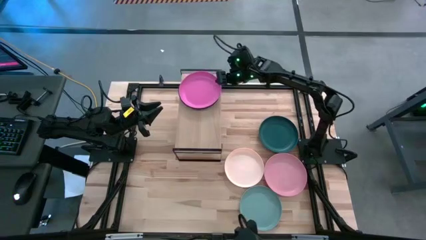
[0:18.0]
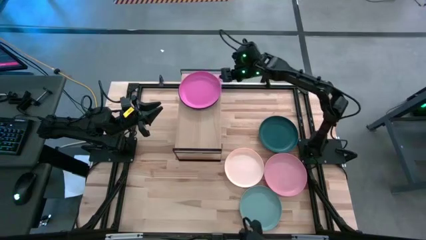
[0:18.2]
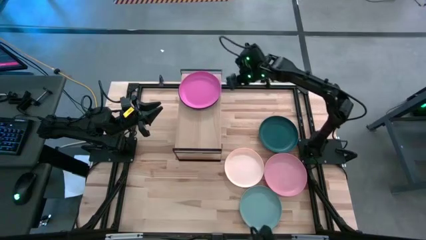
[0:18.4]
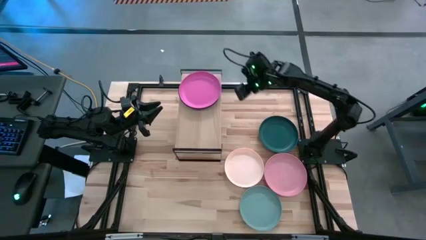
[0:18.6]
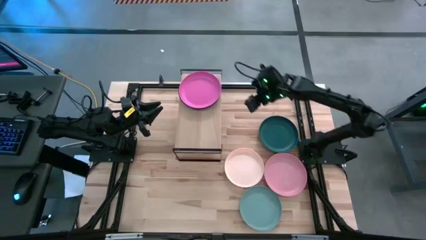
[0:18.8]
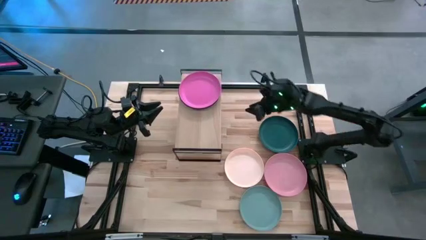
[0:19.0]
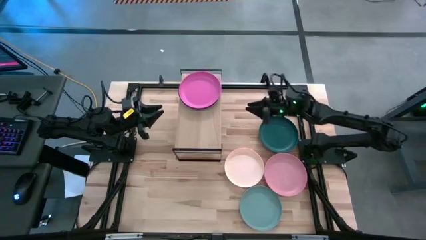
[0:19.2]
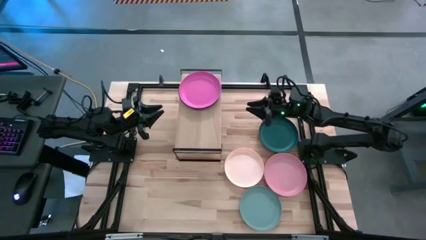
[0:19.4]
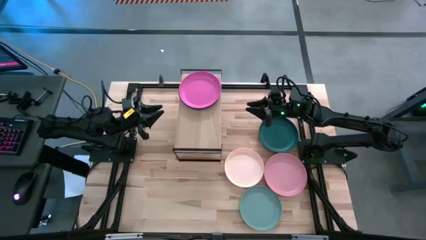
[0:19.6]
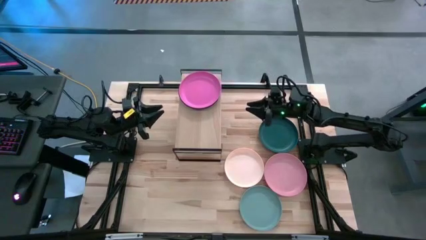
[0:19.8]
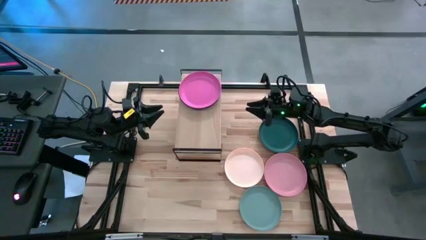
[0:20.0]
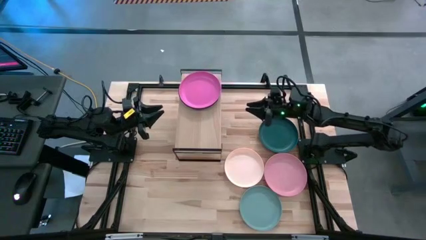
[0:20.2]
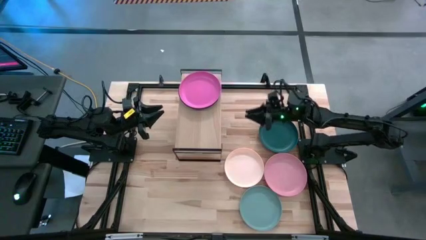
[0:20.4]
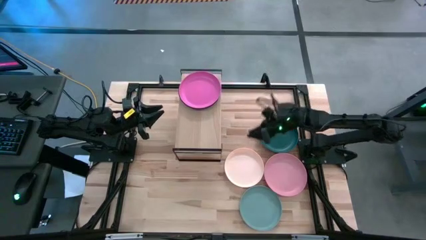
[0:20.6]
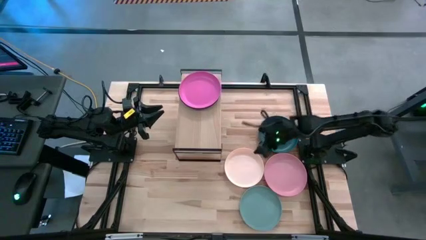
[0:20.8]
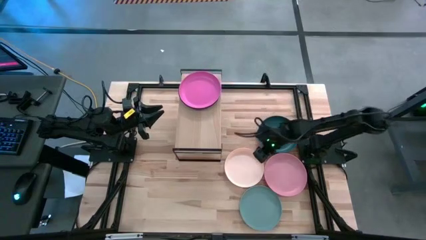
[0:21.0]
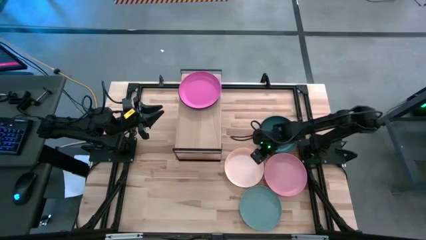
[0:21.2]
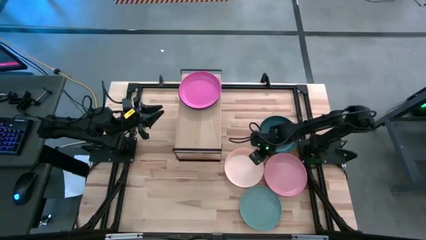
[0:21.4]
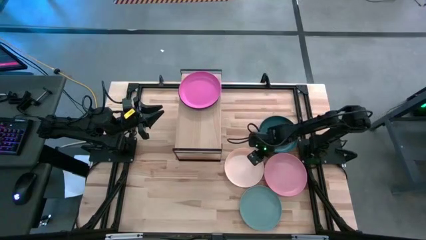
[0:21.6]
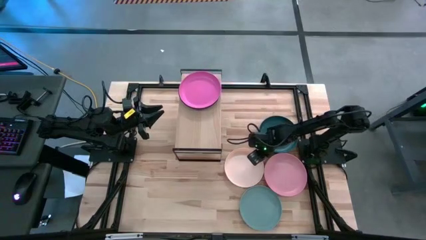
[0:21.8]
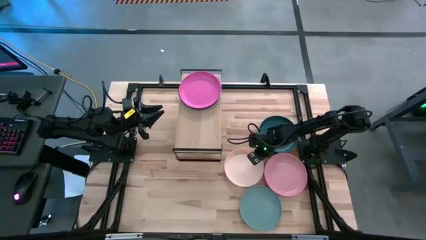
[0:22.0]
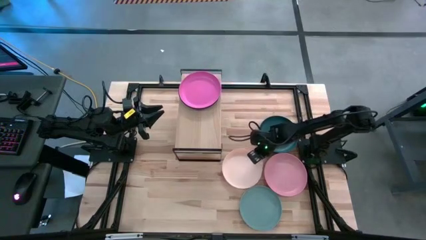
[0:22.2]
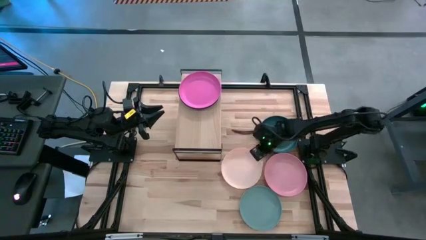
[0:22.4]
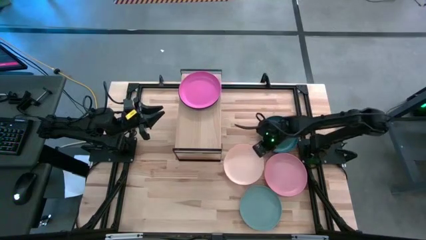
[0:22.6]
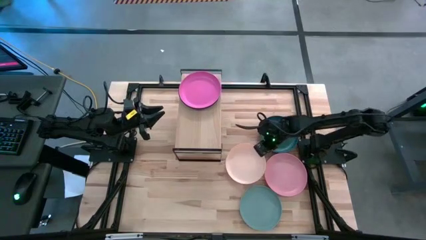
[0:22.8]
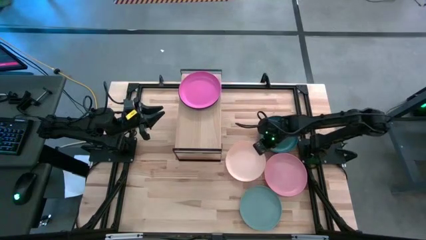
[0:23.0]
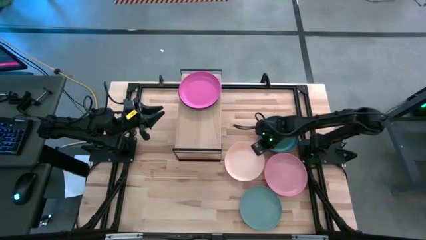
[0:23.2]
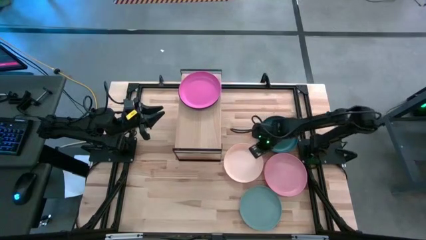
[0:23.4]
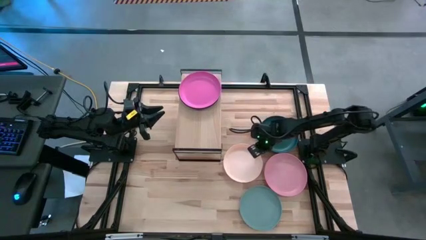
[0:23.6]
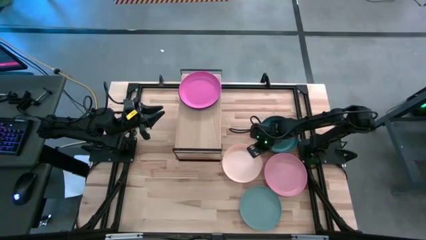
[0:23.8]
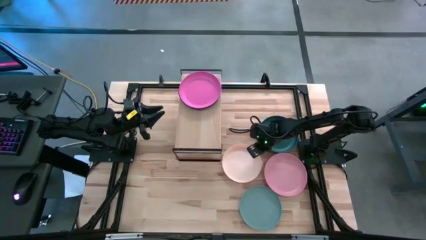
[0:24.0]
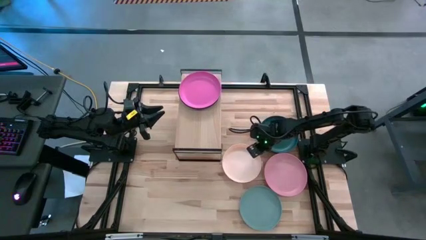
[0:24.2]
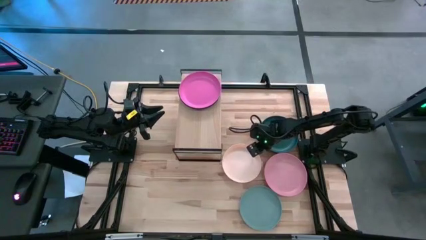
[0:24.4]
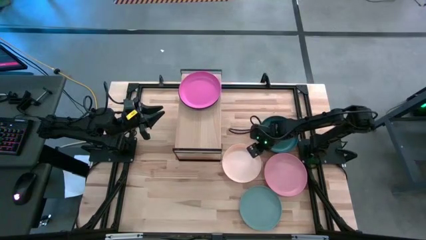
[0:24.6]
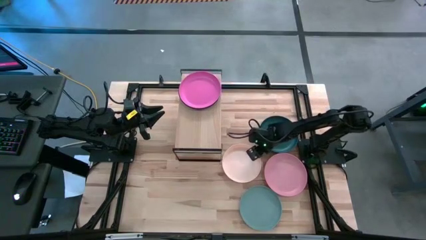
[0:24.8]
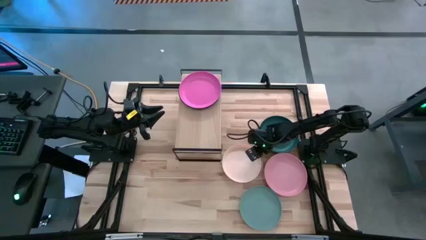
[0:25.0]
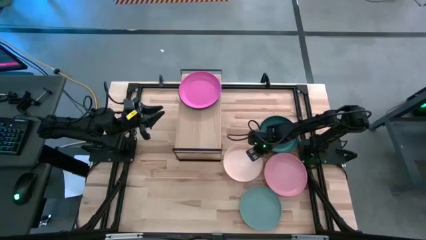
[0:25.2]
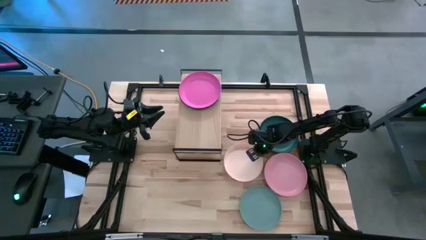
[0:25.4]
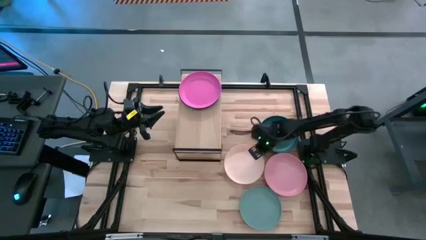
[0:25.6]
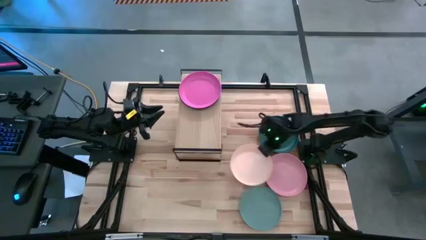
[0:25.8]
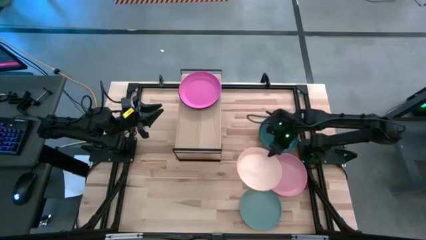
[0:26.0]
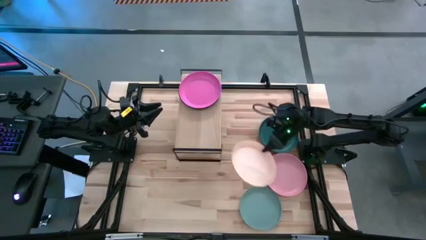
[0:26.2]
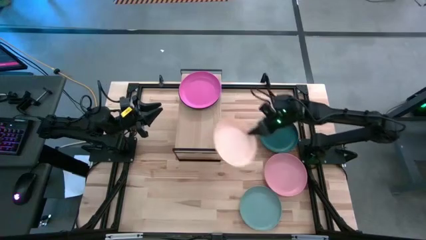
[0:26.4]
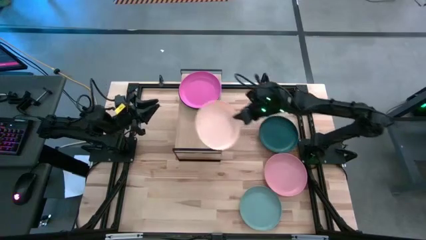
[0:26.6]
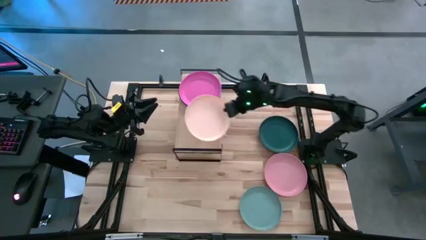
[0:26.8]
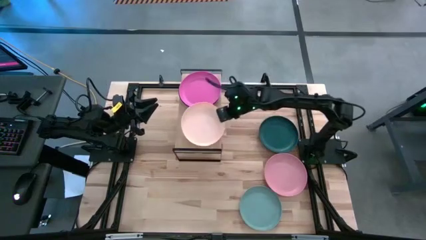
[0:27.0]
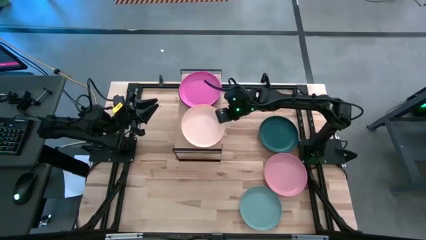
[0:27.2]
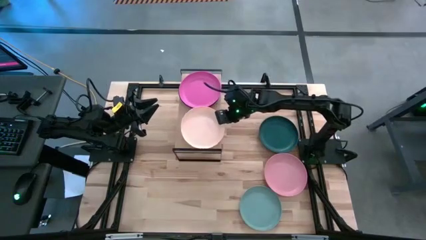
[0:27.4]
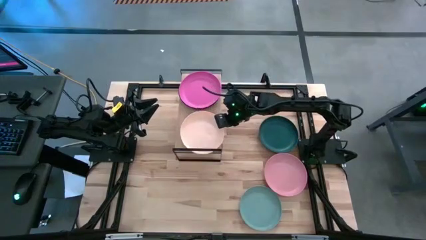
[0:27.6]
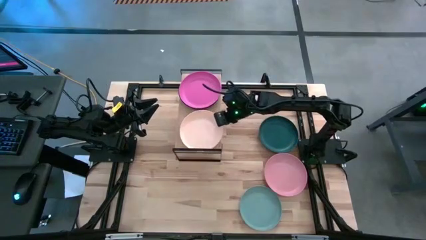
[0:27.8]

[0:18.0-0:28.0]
Task: Place and stack plates onto a shelf
Put the light orange plate on the shelf

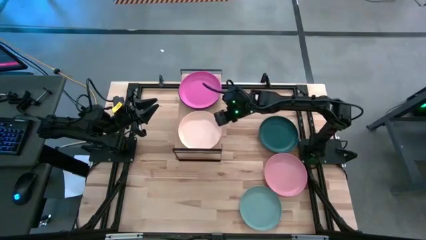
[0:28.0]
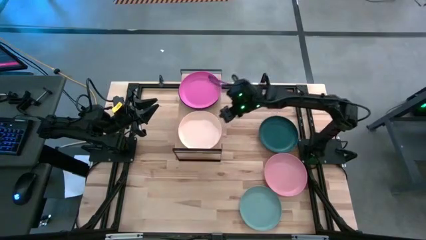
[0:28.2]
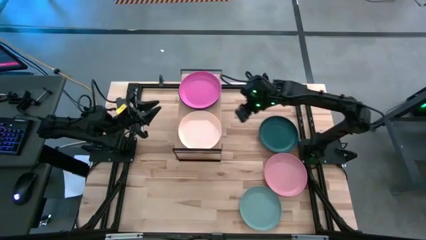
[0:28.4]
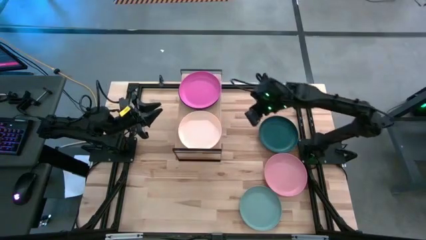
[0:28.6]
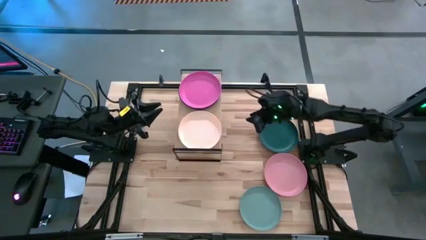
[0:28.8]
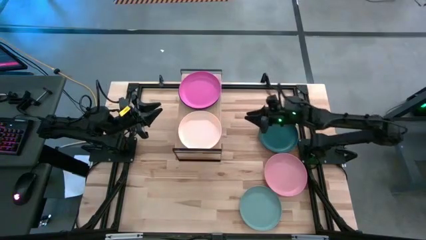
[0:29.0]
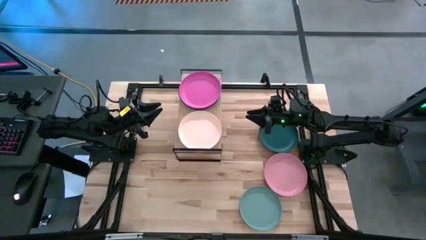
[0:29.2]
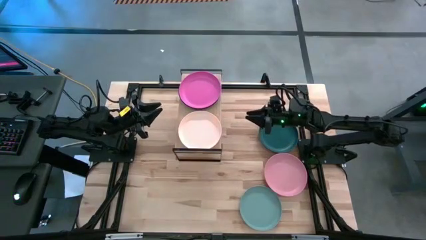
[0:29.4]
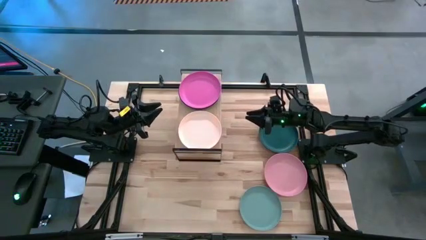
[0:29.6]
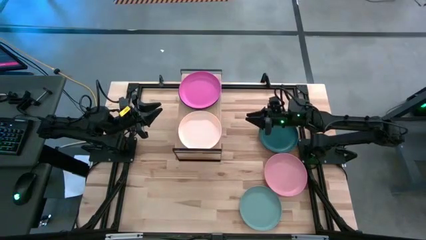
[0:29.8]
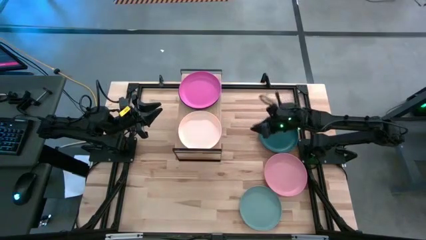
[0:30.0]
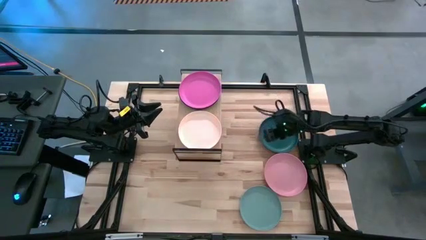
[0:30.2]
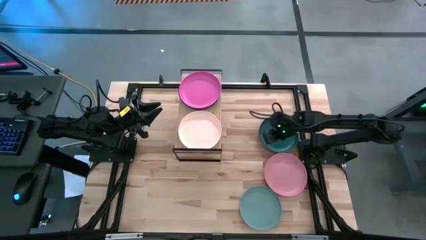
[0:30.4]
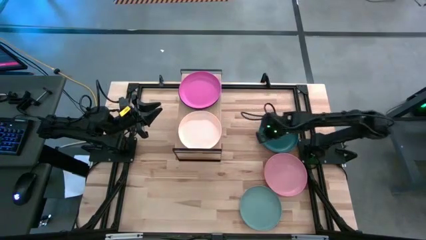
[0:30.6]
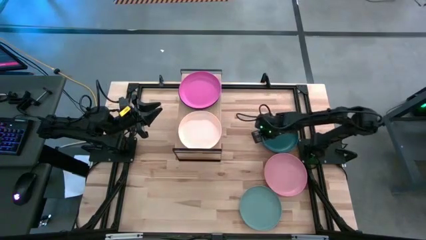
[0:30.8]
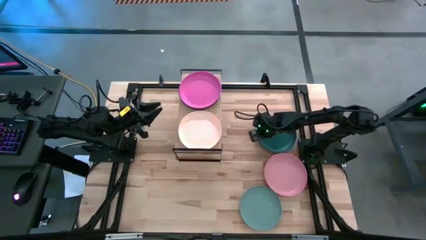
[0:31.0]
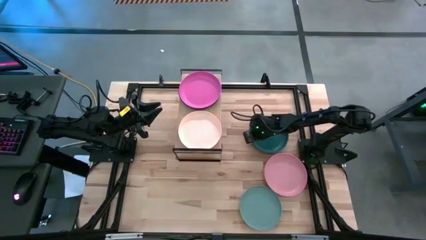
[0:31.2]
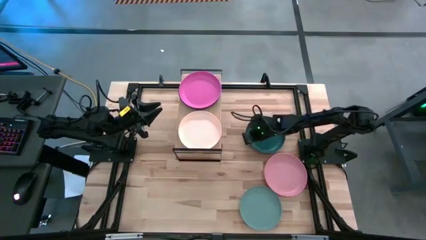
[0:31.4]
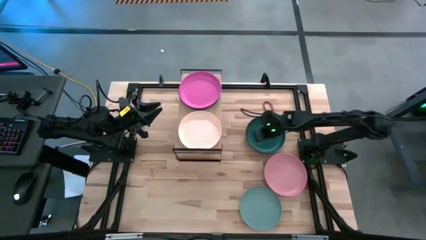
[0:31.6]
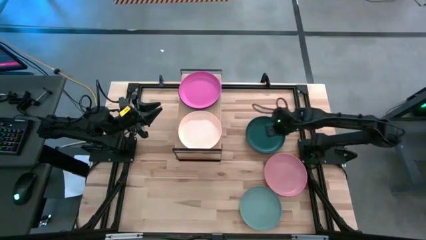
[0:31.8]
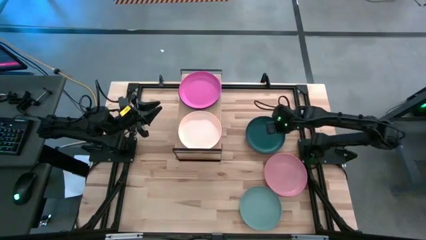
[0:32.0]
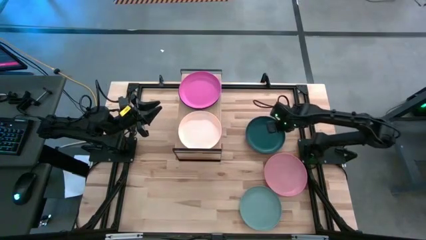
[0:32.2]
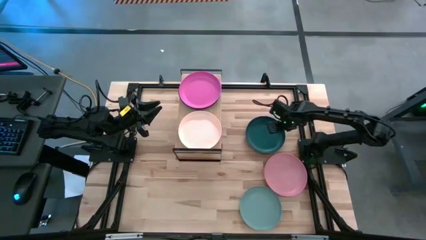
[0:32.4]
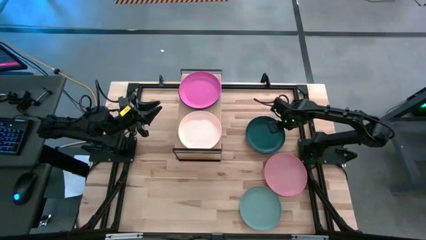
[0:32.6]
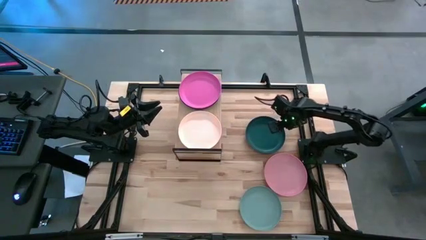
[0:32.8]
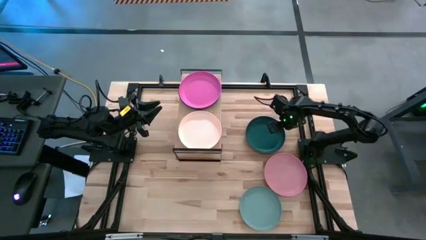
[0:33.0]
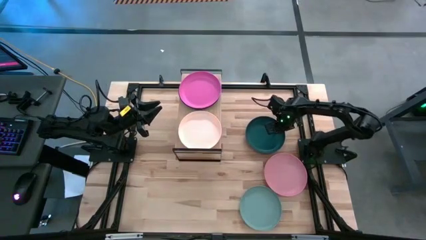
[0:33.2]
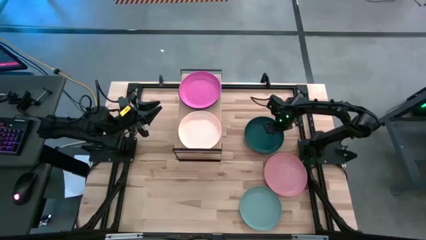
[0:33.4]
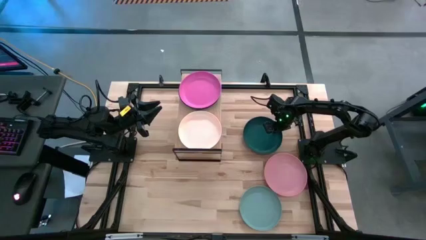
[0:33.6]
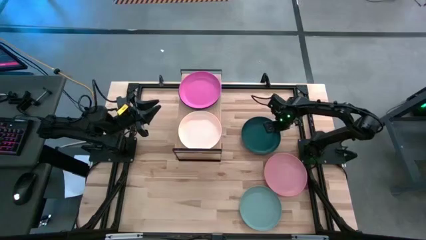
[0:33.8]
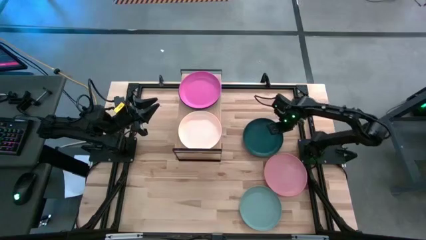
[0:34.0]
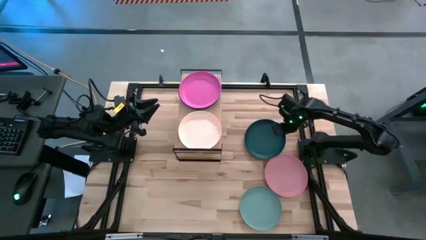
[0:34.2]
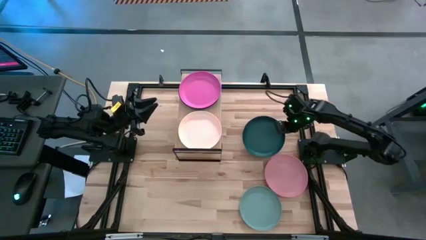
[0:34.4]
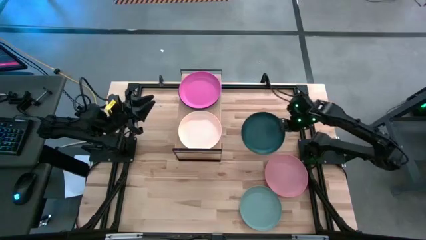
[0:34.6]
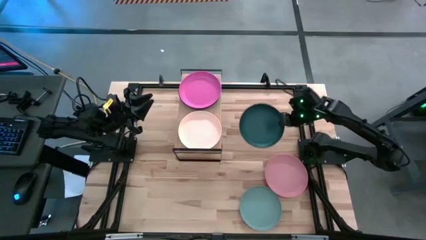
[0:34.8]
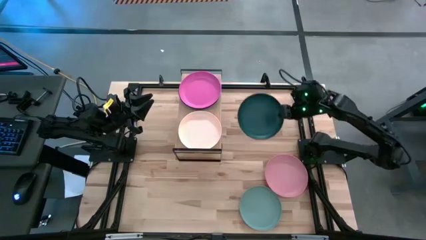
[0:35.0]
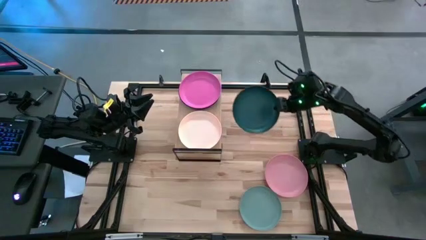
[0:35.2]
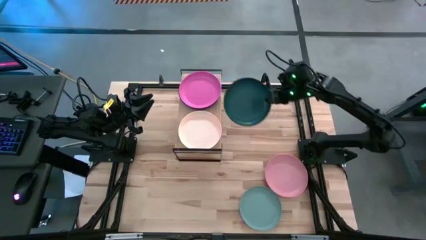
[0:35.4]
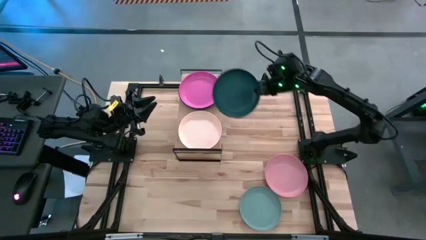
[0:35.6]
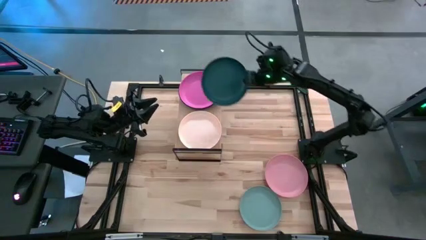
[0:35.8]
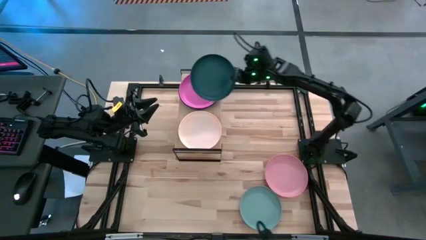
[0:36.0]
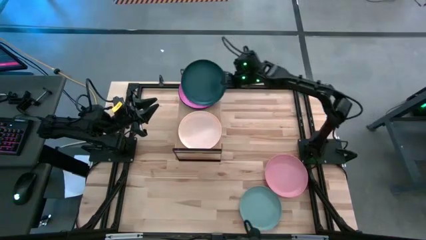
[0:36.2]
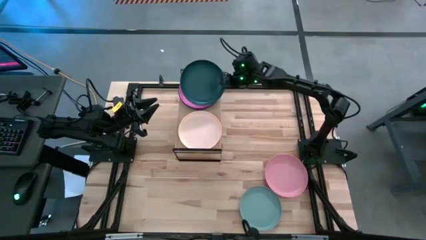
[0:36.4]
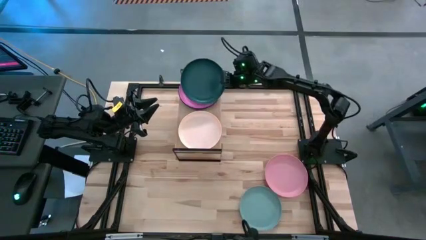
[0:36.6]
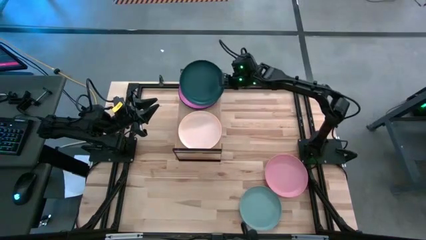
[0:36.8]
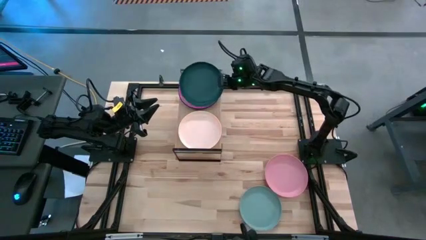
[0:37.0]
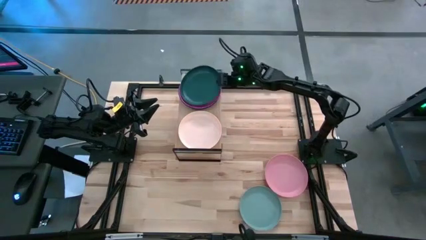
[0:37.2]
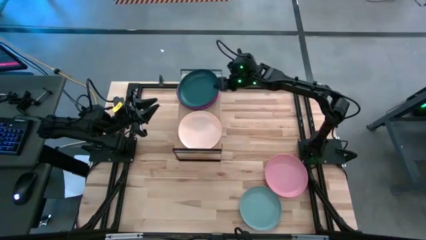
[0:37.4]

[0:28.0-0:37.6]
Stack the dark green plate on top of the pink plate on the shelf
